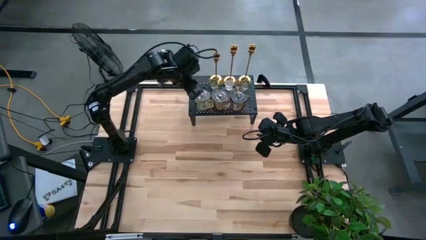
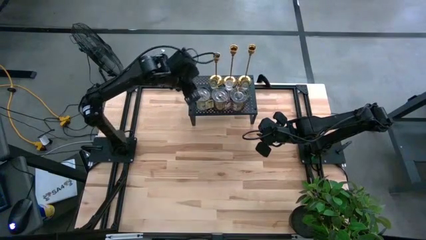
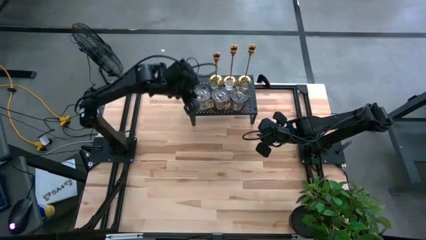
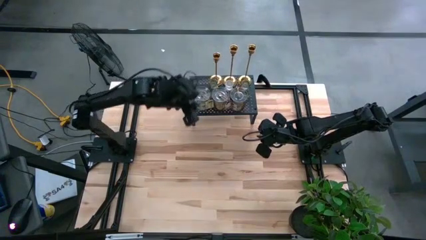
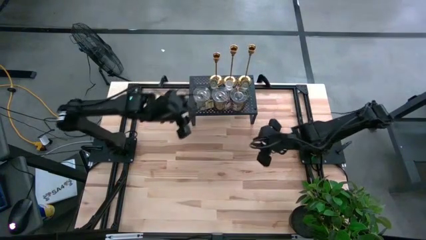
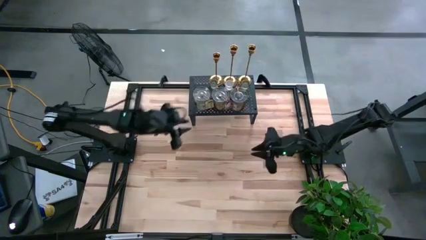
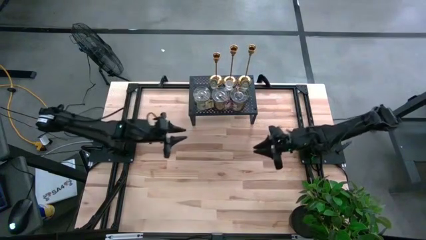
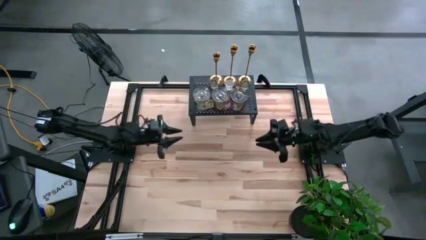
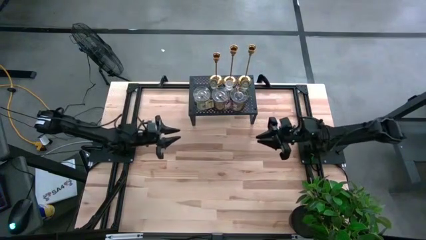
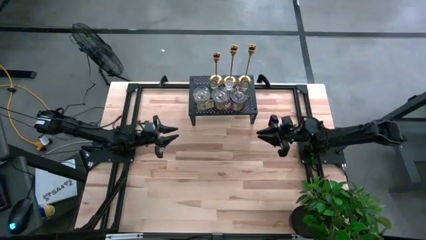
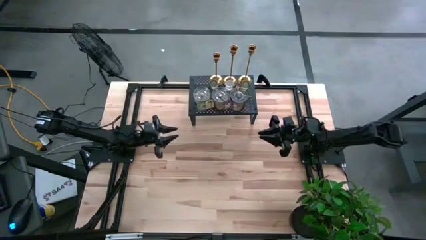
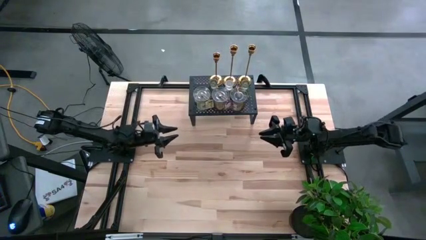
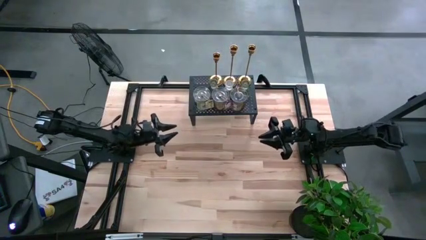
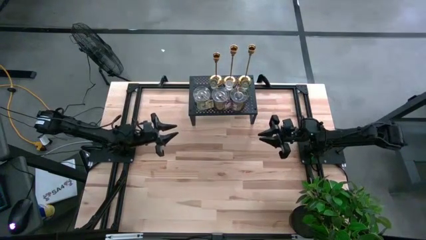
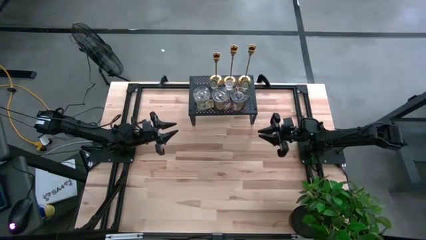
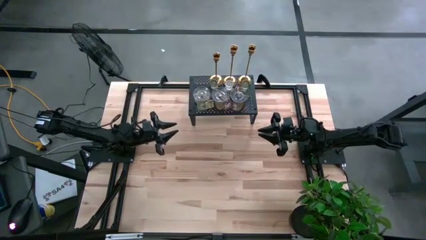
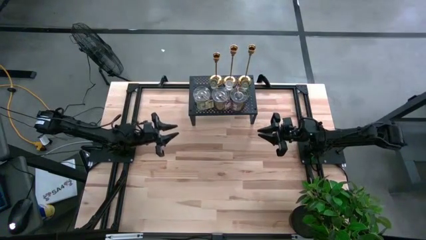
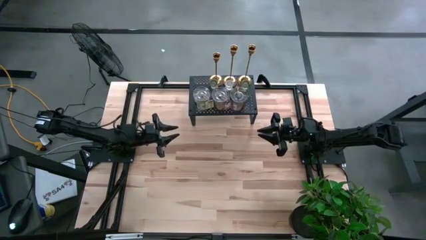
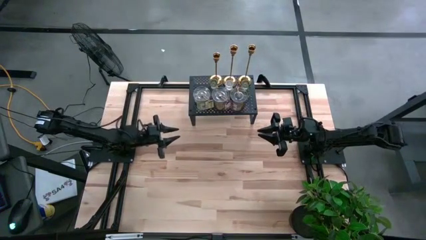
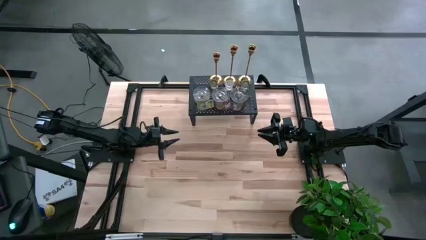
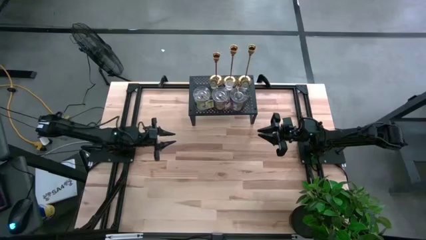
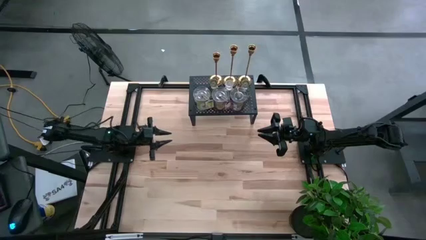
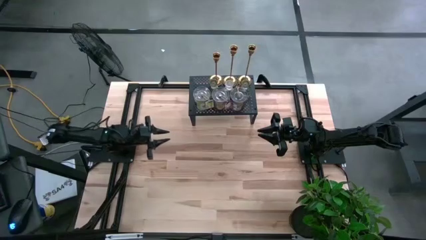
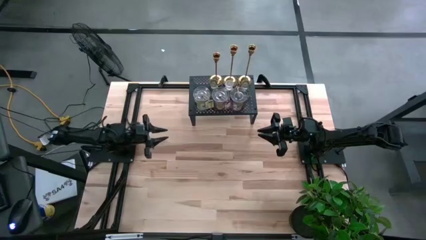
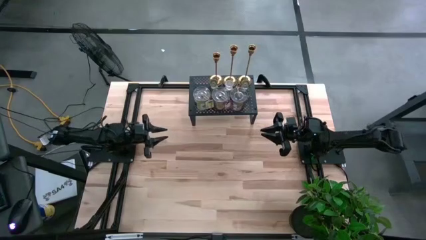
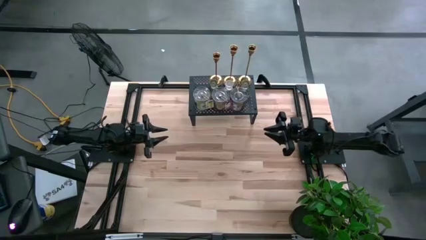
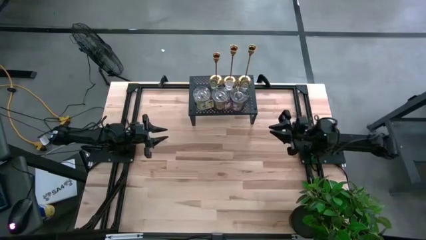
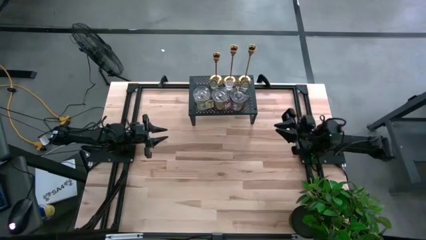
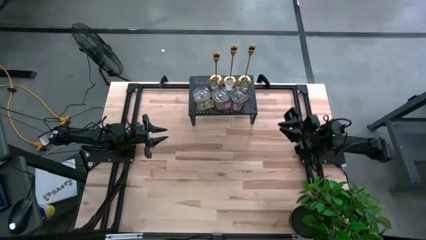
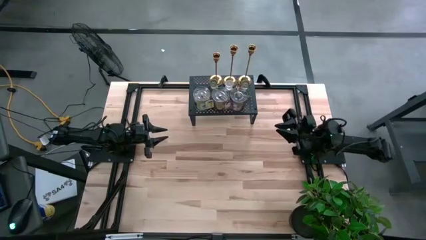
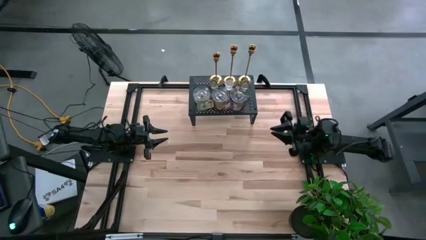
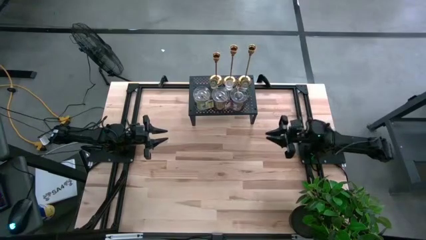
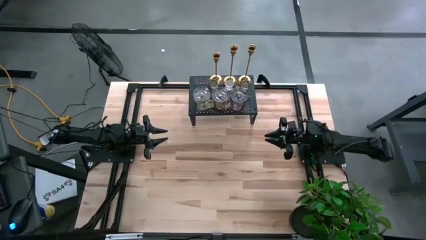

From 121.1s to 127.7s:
Task: Pick & Place candle stick holders
Return to Home Position
